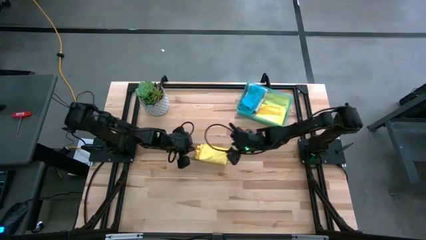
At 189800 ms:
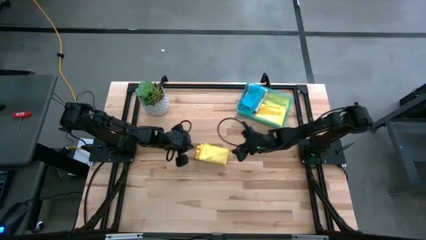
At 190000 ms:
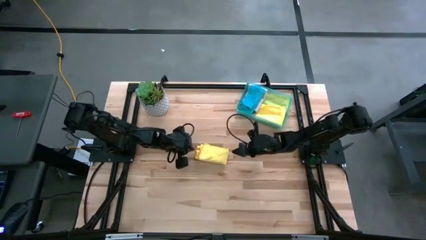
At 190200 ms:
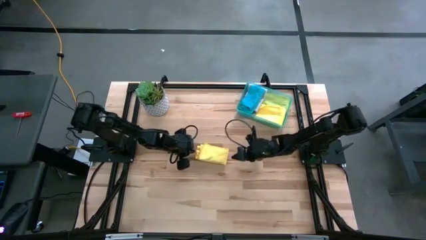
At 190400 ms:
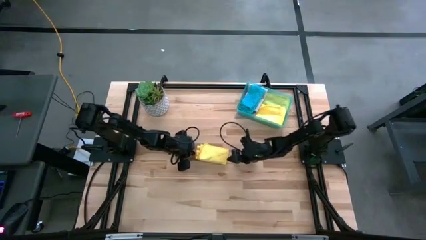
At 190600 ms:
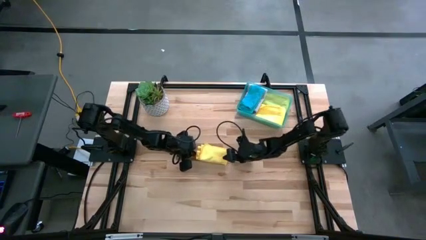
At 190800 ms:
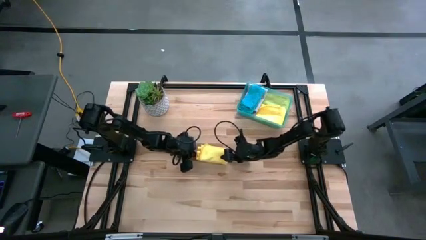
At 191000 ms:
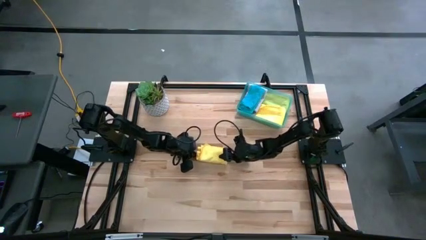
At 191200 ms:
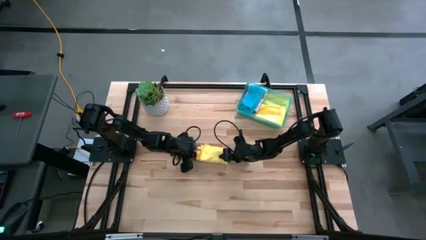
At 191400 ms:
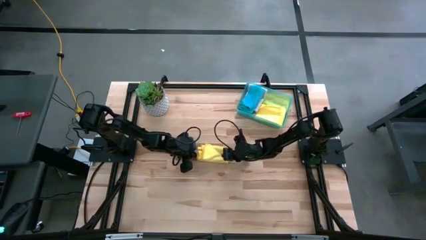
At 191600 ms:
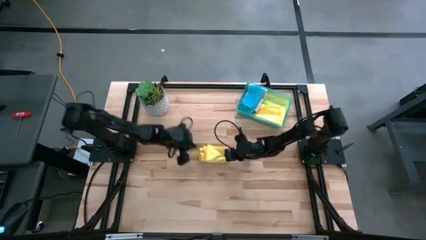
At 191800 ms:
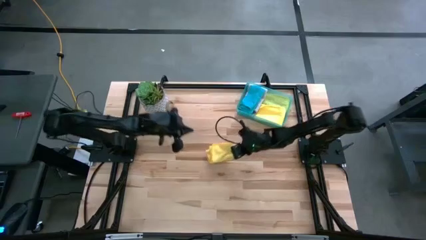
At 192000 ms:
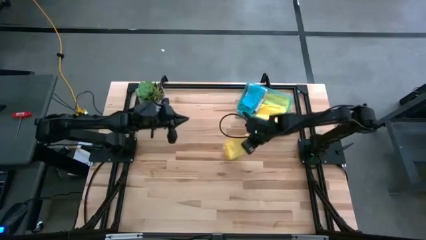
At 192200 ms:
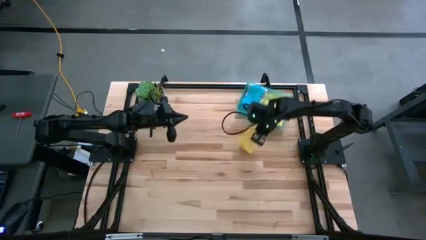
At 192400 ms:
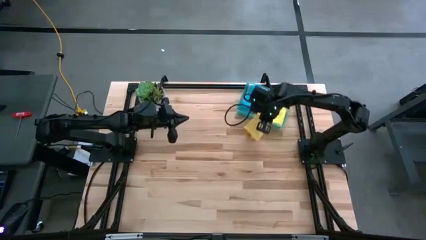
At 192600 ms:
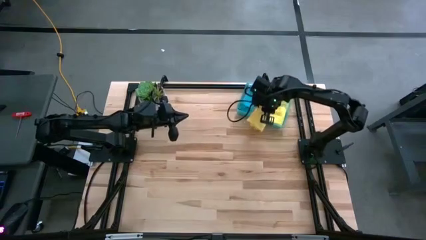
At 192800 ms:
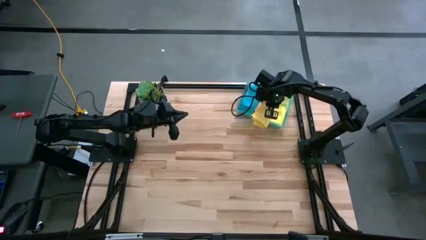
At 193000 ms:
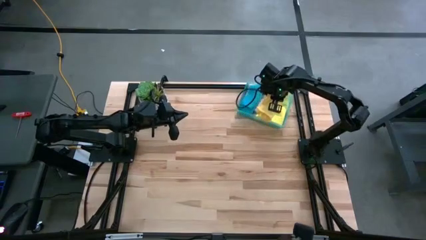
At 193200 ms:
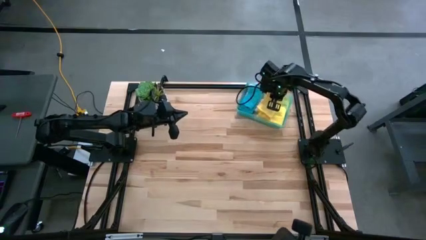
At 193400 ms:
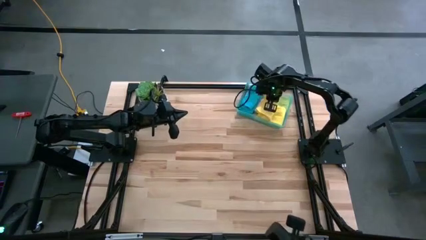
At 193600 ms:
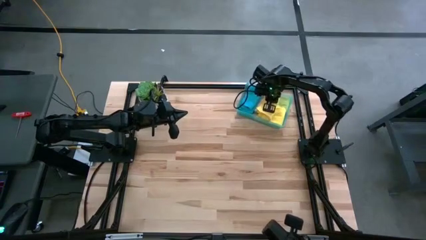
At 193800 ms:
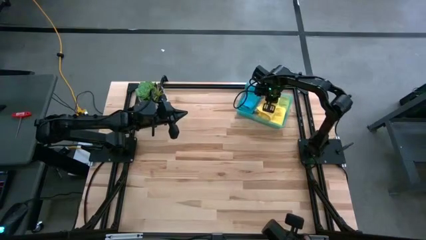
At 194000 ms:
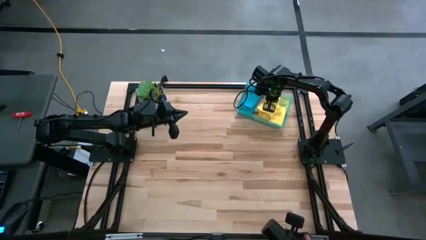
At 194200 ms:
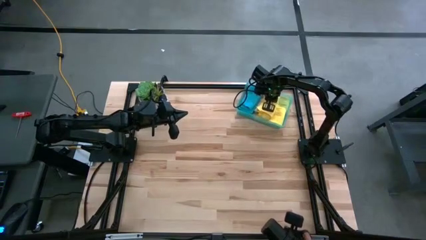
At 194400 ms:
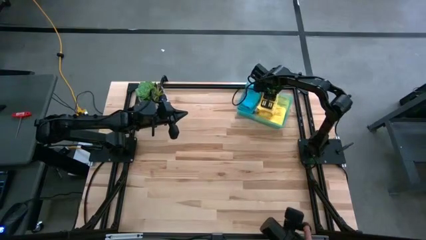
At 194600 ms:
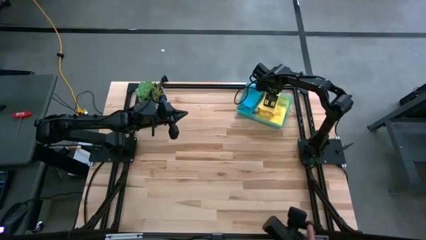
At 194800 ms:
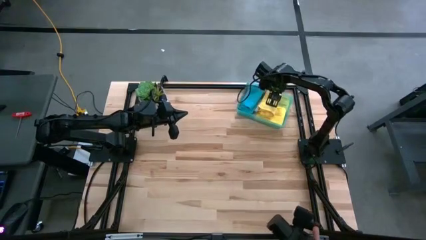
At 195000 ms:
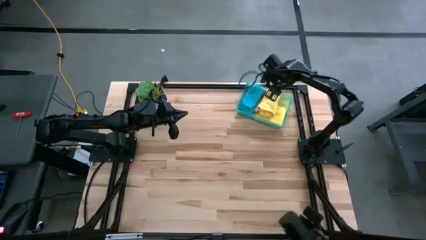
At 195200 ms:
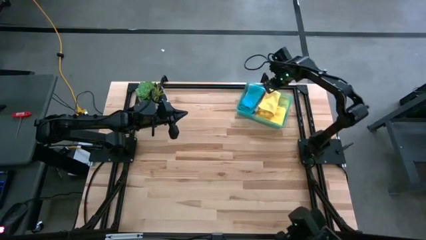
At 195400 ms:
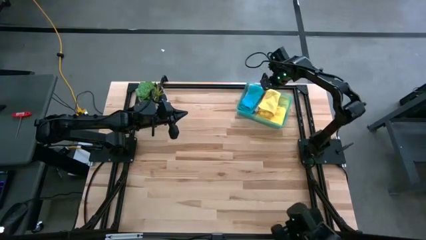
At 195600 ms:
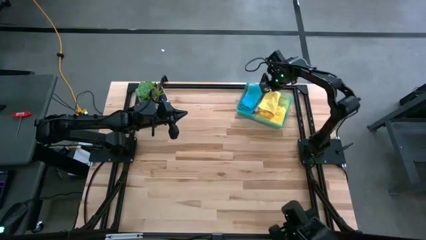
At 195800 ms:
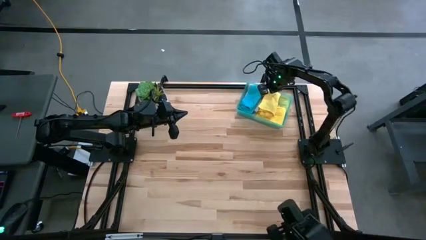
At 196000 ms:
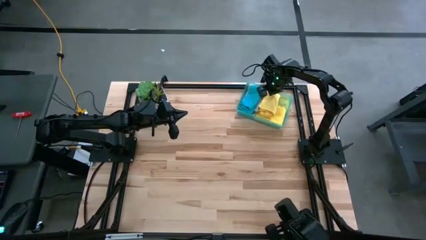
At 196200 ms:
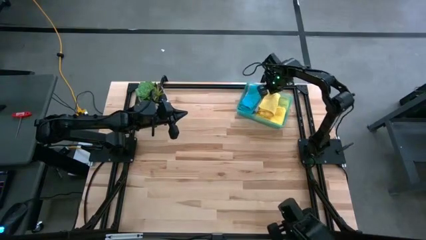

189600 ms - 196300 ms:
Task: Fold microfiber towels
Put the yellow towel into the bin

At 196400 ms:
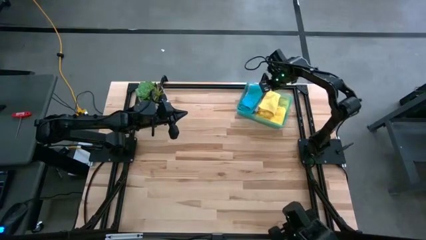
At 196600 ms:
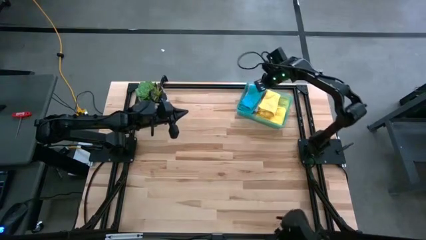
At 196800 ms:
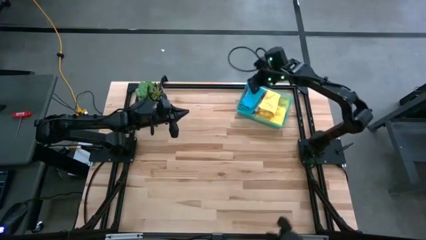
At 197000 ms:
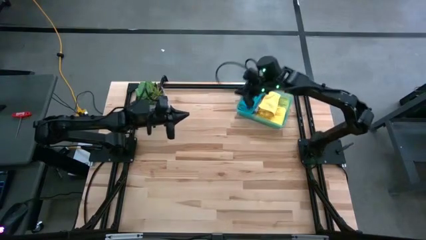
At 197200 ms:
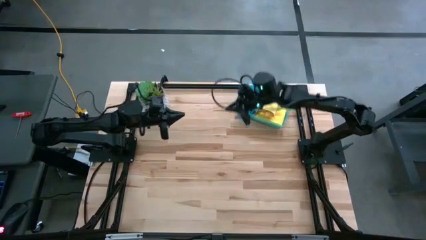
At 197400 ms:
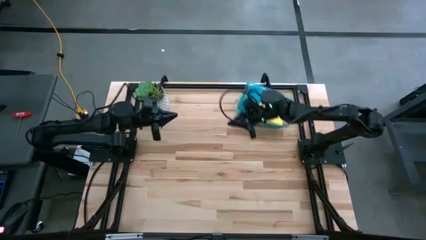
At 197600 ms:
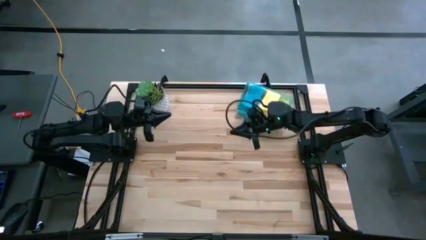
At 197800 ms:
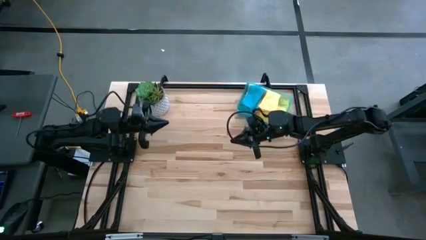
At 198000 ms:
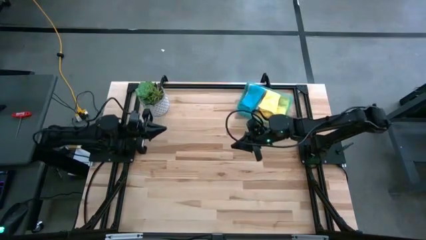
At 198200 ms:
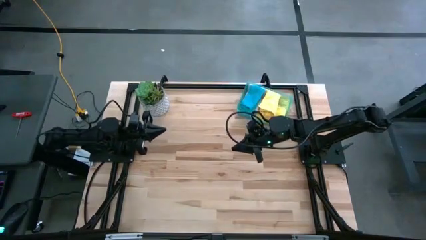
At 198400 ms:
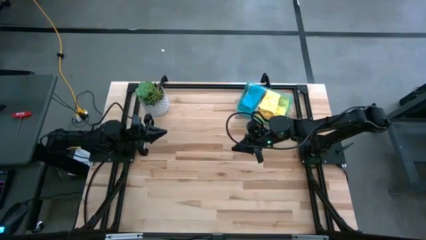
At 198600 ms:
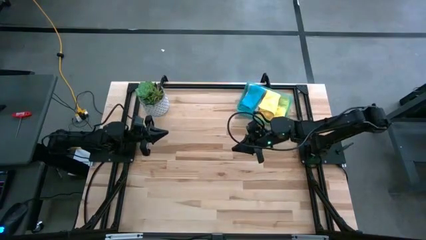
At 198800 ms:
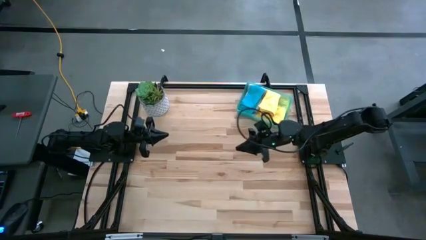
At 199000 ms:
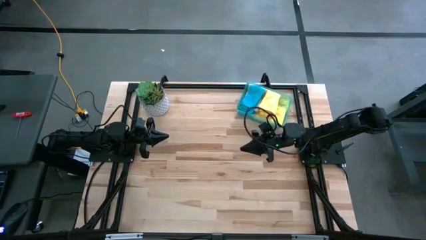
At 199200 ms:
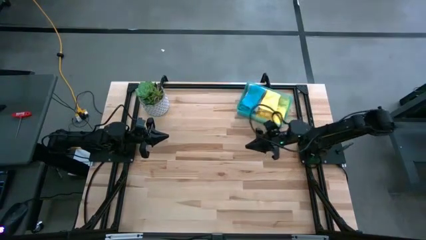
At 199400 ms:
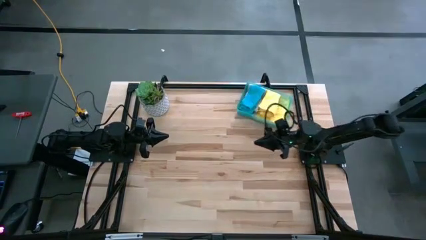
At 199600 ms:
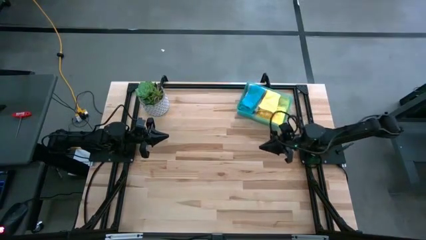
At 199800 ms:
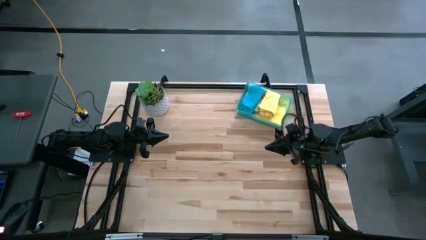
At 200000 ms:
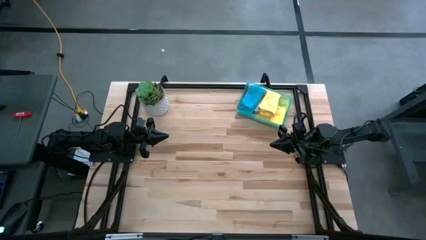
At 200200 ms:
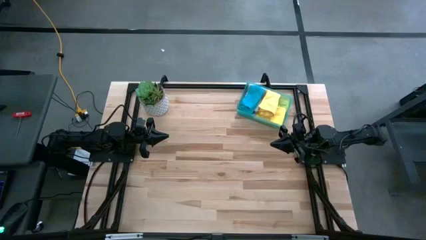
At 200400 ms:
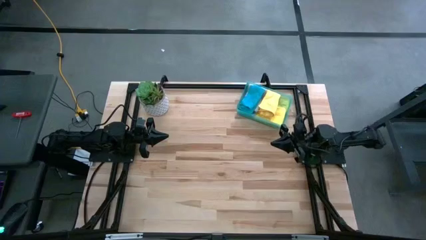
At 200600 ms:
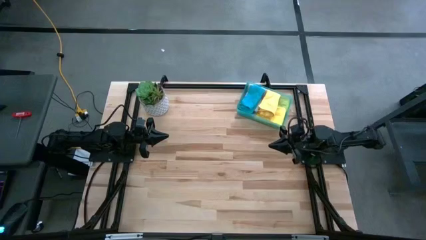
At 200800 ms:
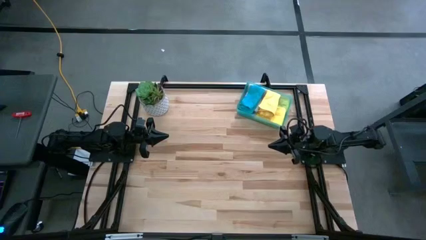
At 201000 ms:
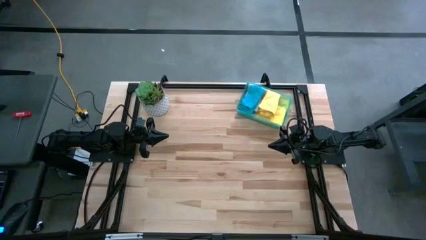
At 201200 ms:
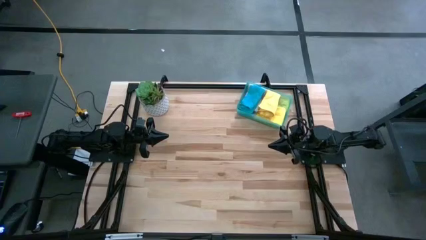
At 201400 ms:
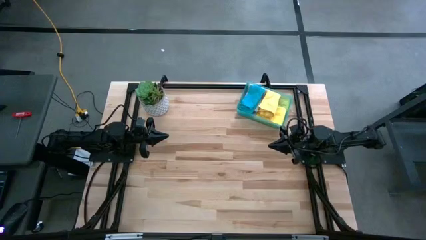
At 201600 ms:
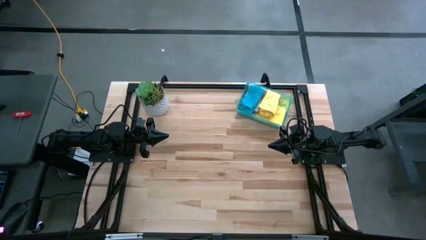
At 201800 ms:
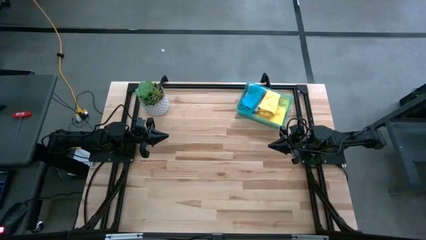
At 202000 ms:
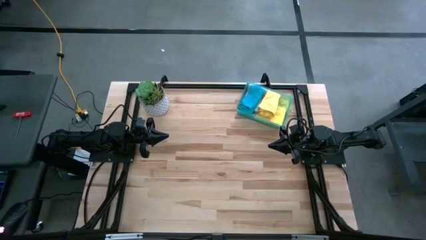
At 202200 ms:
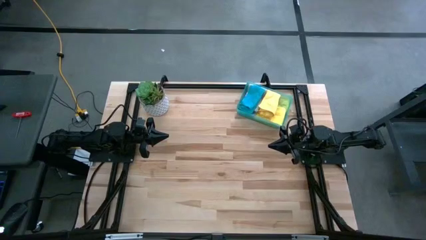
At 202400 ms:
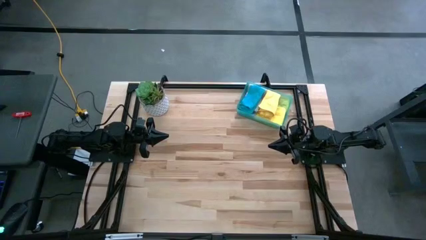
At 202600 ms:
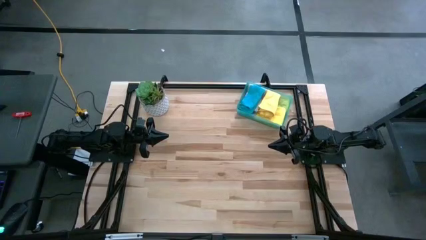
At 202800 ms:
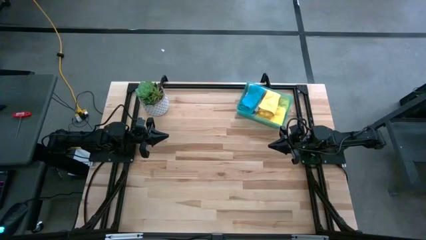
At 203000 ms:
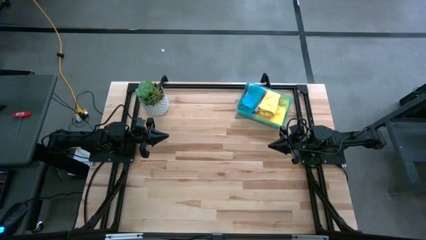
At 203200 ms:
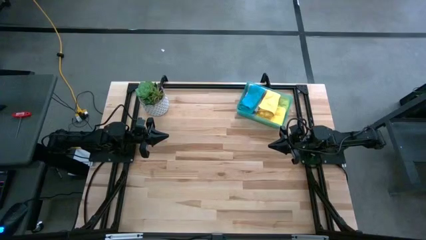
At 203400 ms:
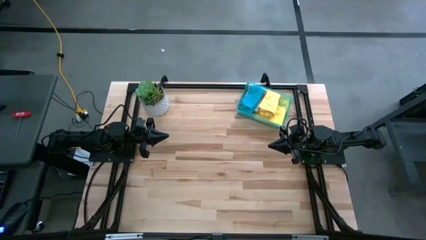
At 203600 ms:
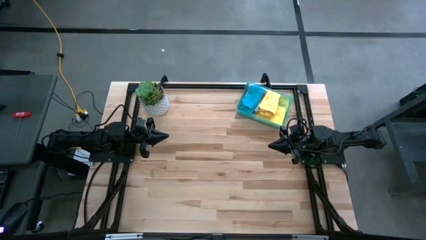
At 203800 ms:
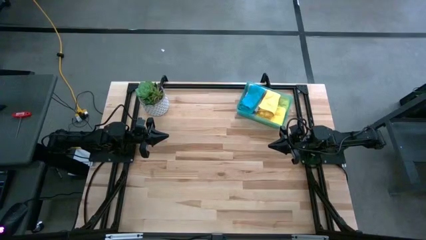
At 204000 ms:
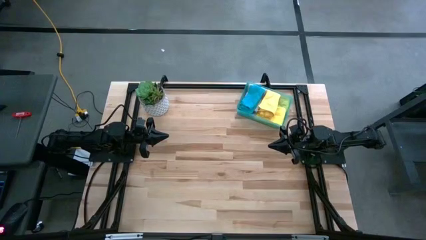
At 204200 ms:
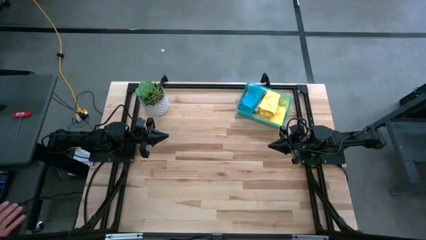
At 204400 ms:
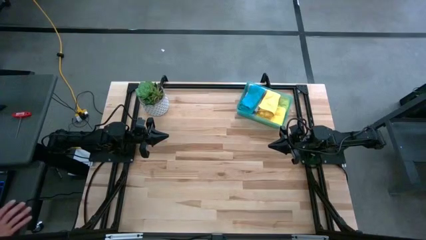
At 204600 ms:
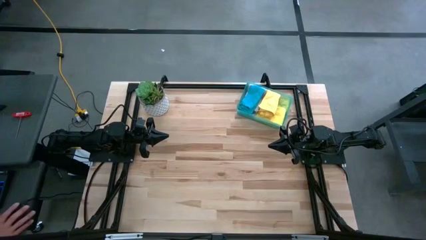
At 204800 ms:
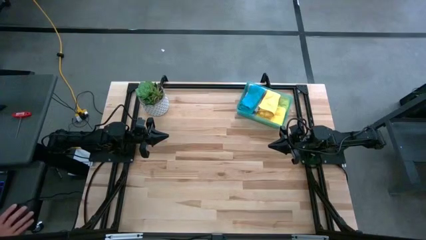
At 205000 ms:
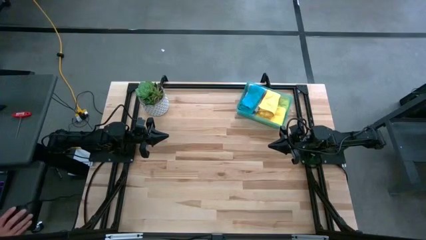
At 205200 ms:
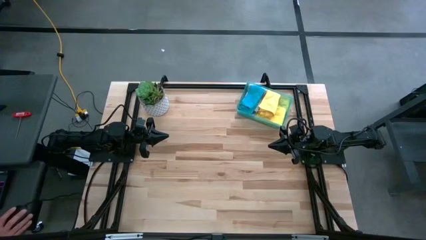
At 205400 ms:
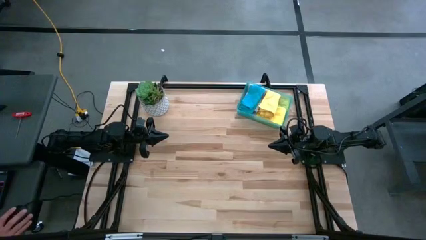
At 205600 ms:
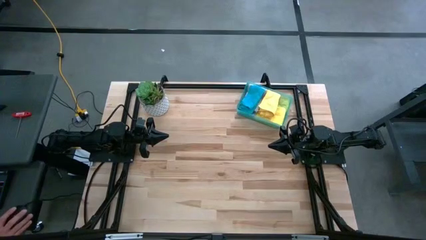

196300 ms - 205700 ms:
Return to Home Position
